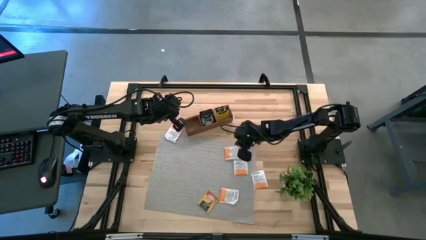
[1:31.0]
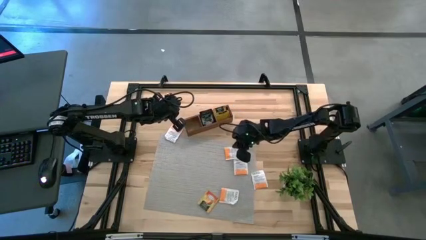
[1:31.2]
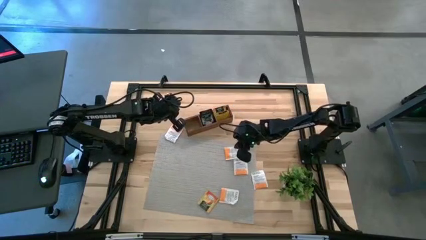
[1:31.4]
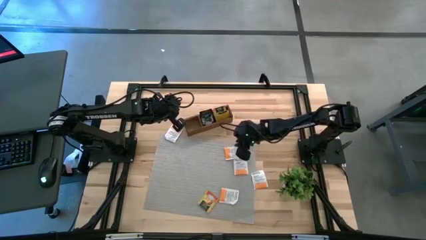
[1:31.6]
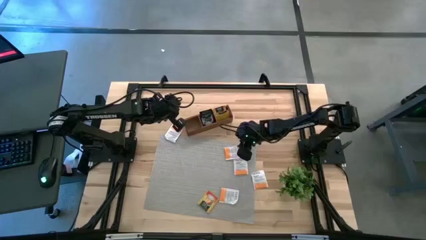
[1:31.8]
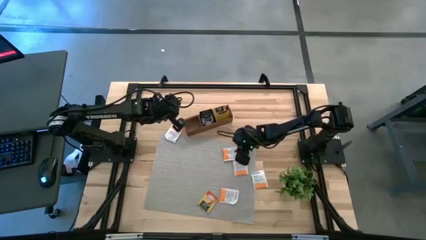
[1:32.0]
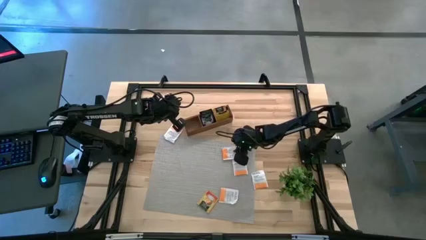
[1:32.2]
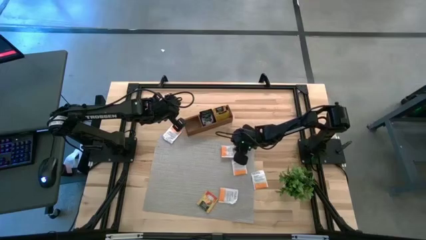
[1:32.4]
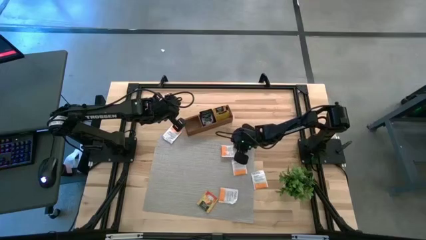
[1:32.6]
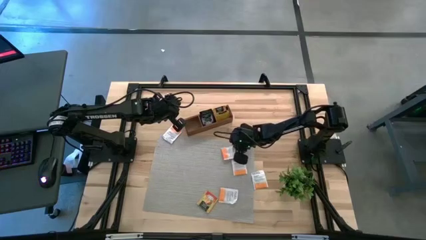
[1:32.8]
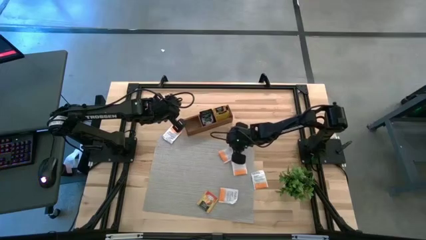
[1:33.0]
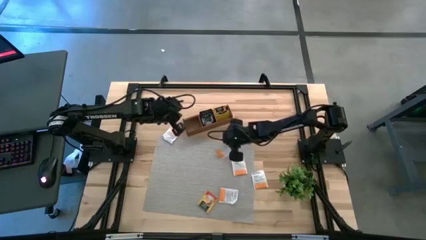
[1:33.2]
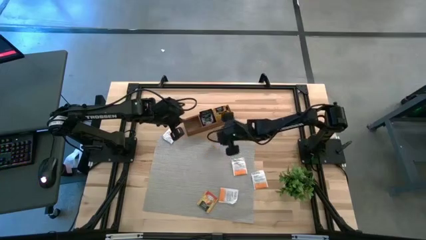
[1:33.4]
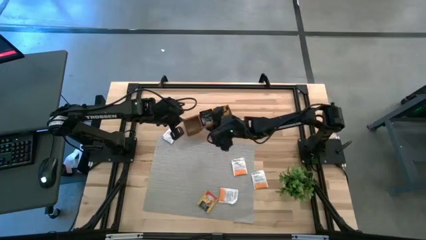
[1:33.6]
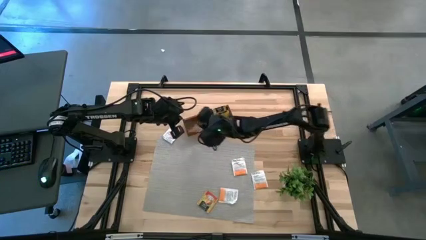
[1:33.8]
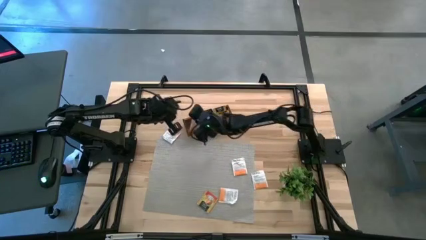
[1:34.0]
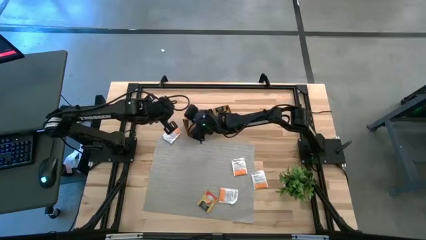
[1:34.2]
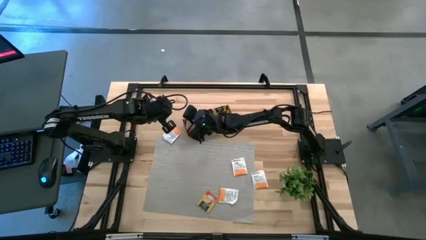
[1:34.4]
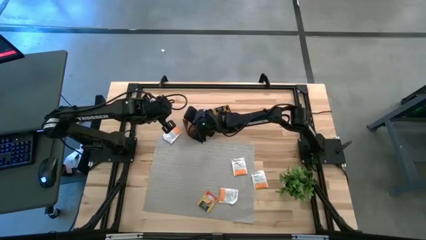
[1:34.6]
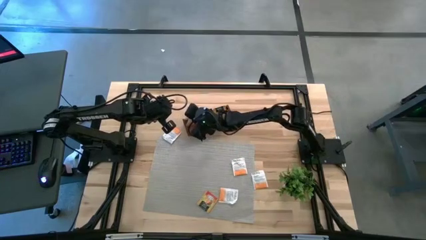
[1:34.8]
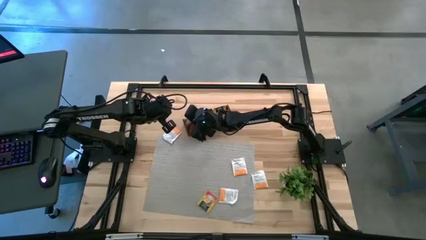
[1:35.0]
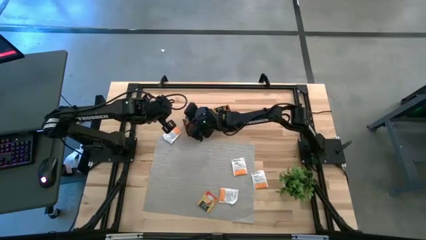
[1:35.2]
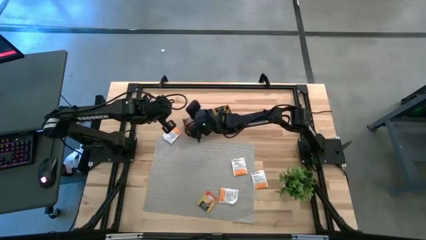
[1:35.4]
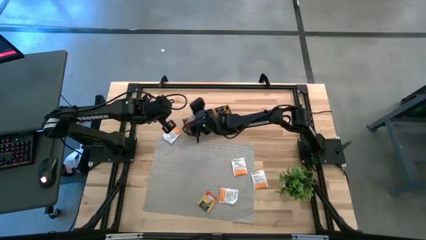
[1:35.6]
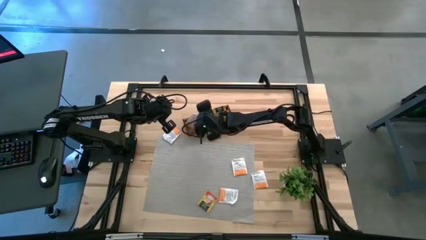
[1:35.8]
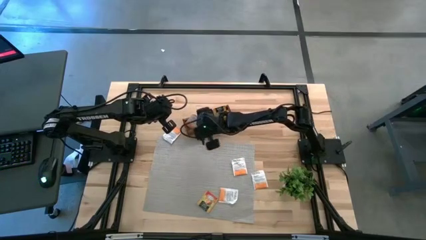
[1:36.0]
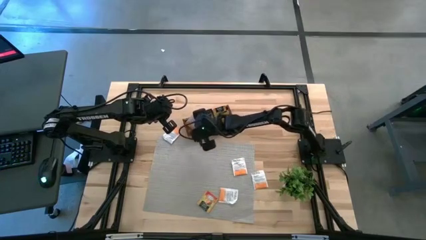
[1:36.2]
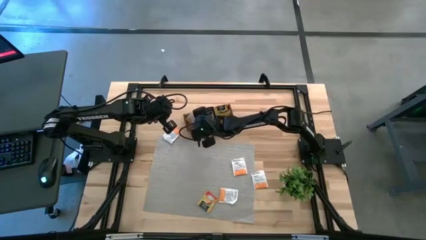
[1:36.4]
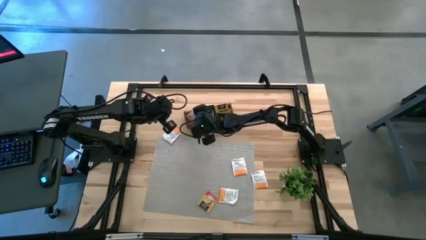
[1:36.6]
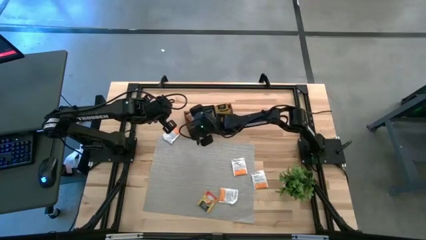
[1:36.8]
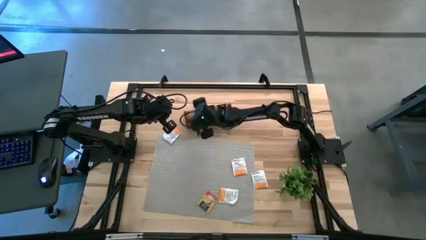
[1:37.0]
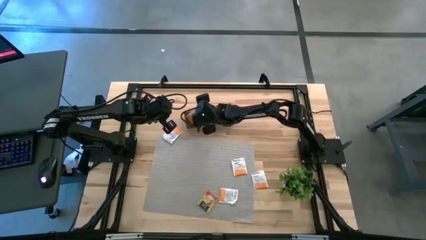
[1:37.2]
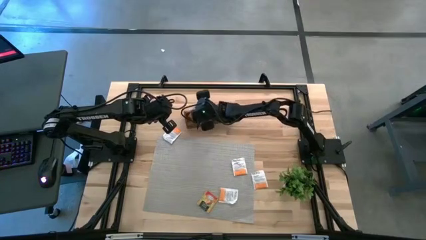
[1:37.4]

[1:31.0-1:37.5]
Task: Pick & Place Tea
Put the orange tea bag into the left section of the wooden organizer

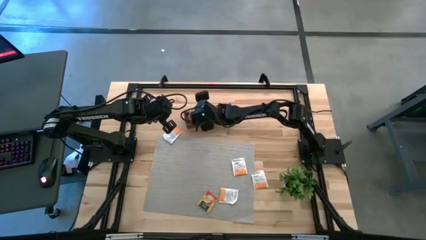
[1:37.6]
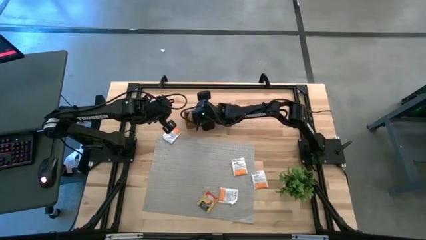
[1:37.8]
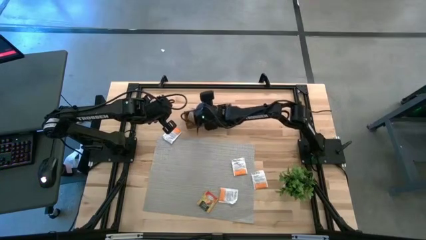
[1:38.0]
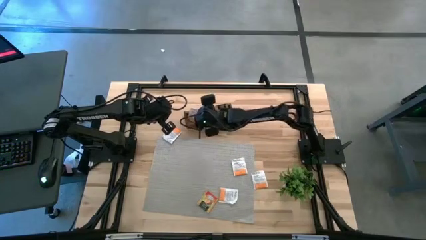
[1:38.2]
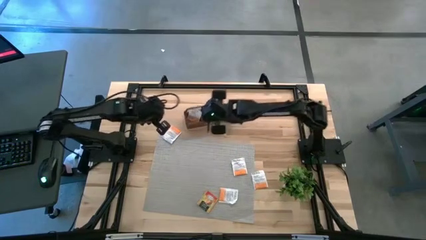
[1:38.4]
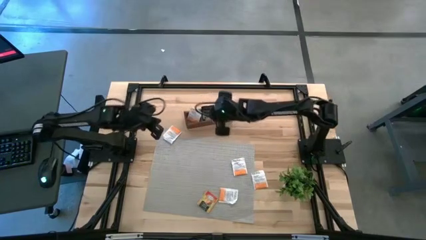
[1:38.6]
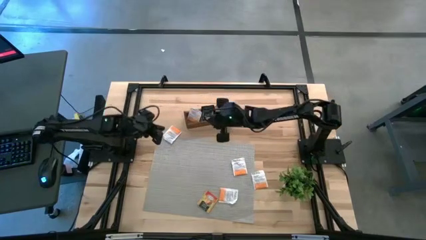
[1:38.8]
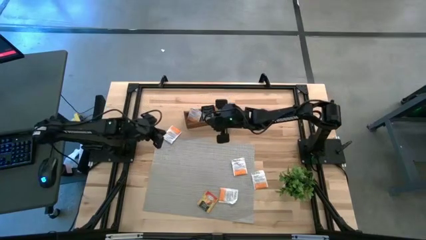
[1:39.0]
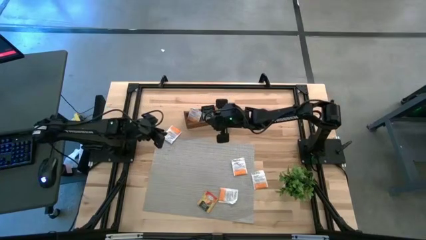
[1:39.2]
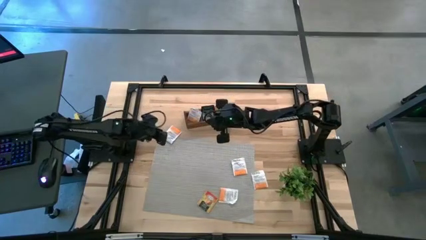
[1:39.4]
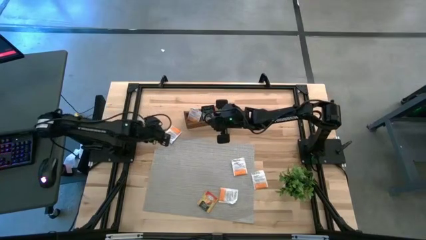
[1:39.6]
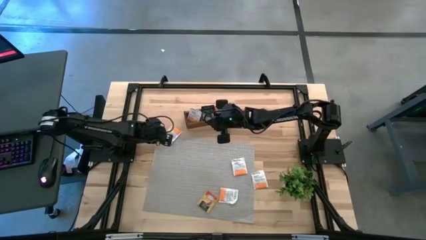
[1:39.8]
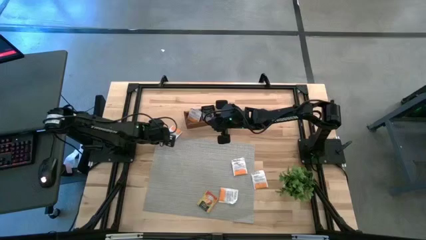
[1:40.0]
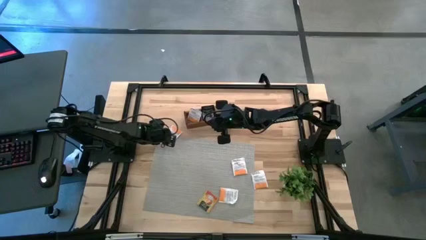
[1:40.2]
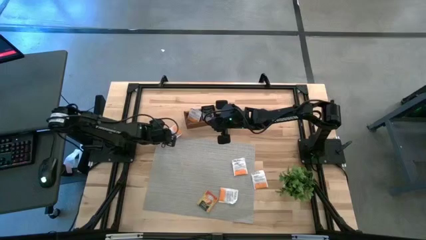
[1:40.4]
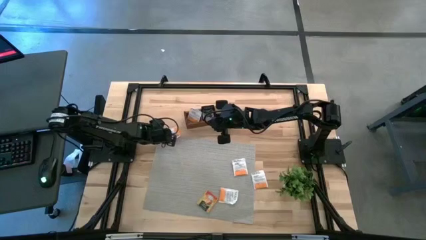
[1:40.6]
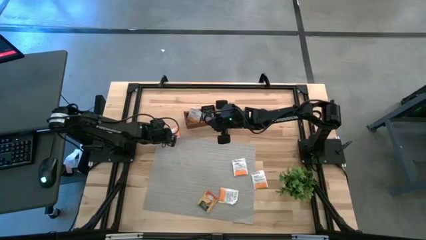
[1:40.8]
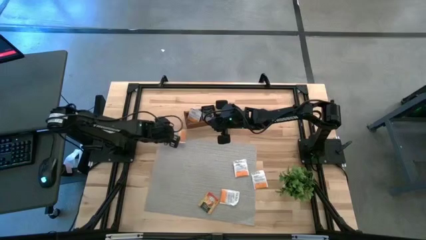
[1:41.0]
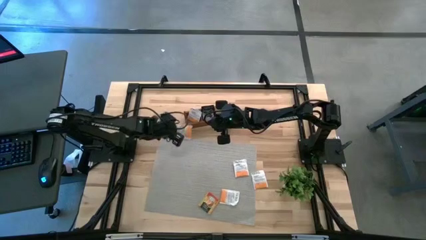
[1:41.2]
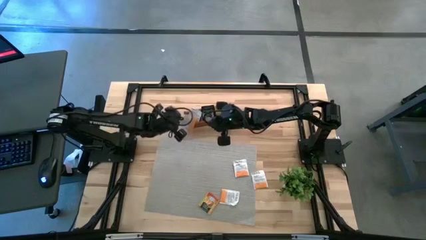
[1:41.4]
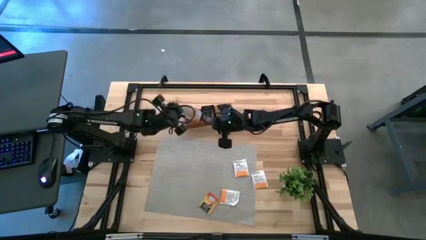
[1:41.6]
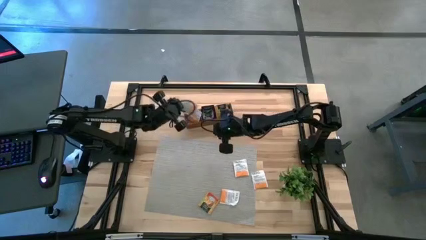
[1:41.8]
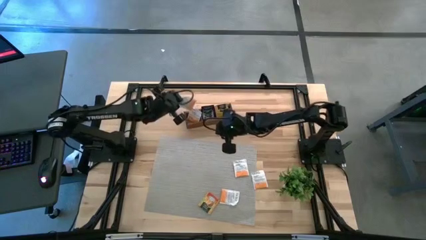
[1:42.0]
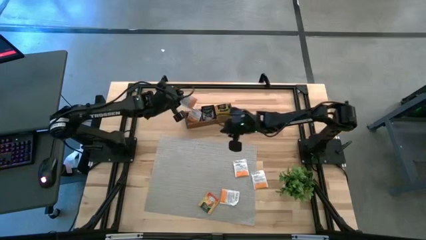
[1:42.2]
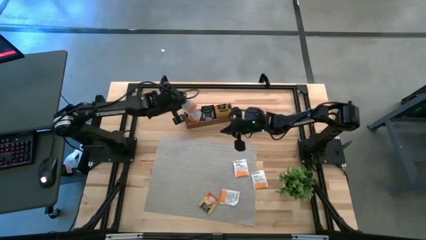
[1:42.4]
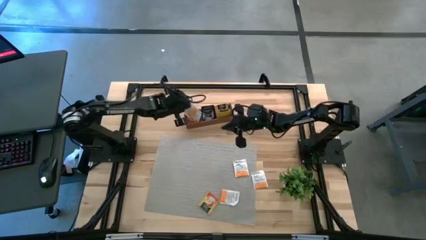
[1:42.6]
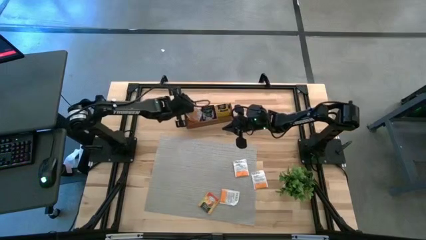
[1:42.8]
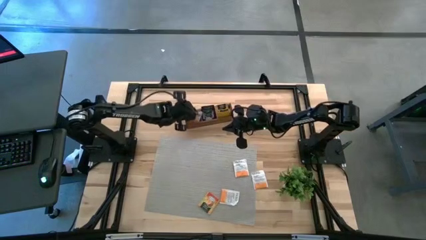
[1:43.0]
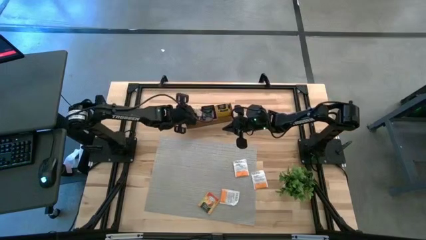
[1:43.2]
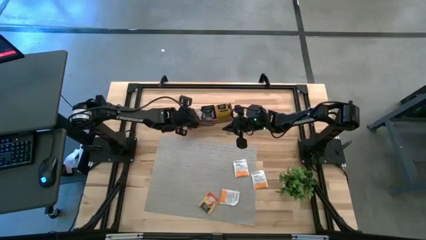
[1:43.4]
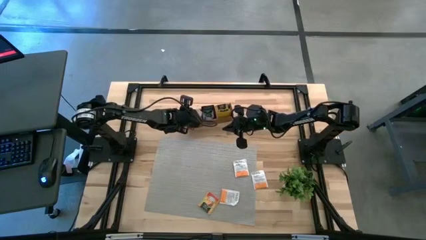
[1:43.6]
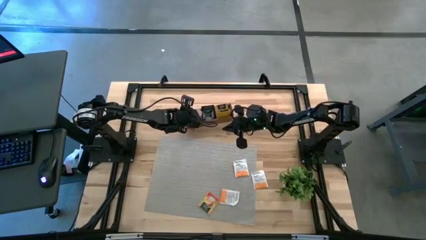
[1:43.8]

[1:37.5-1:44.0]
Put the orange tea bag into the left section of the wooden organizer

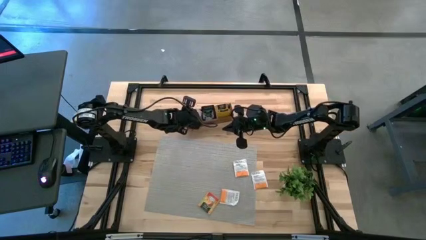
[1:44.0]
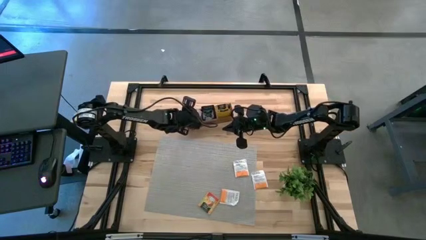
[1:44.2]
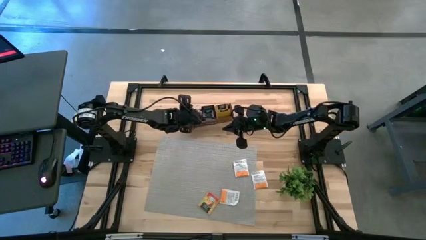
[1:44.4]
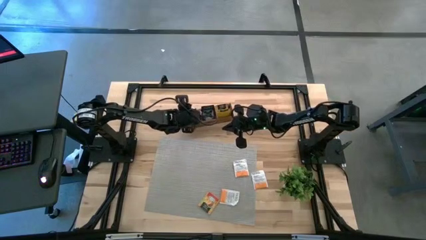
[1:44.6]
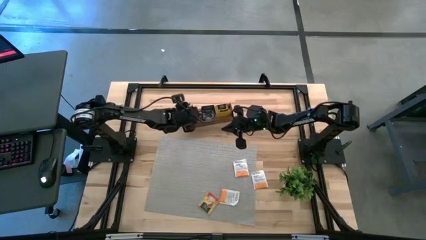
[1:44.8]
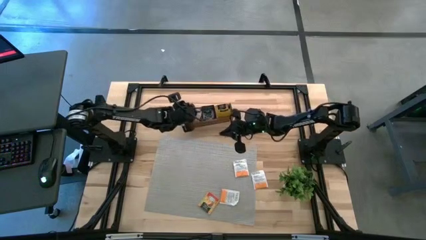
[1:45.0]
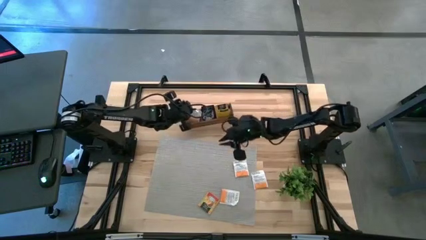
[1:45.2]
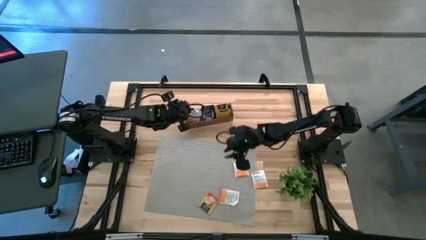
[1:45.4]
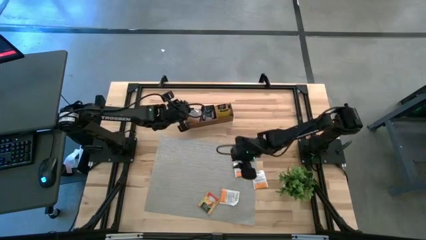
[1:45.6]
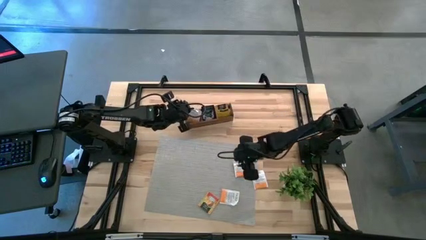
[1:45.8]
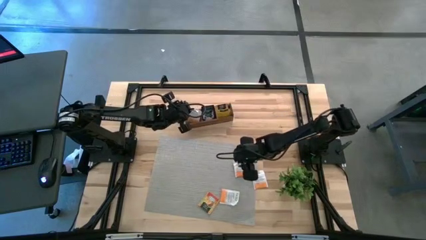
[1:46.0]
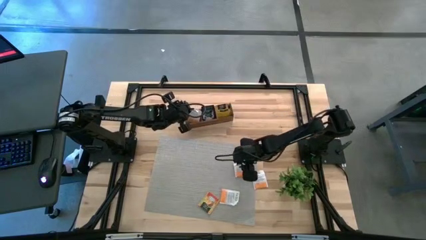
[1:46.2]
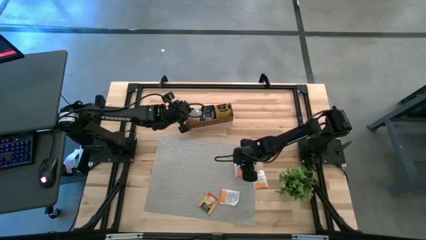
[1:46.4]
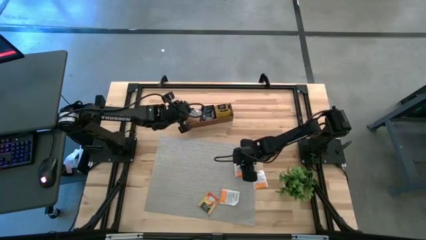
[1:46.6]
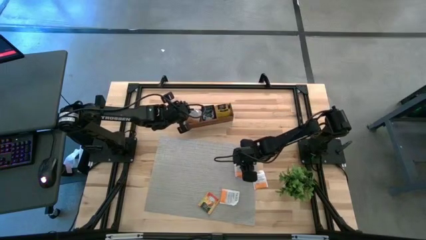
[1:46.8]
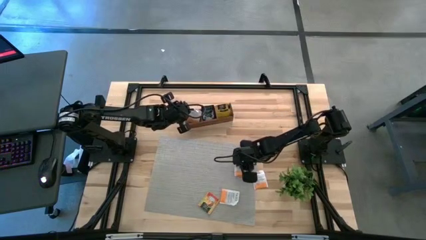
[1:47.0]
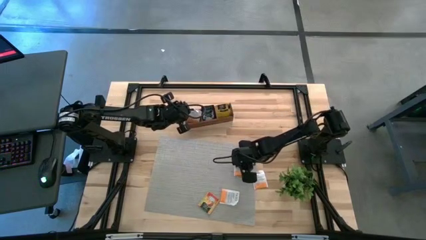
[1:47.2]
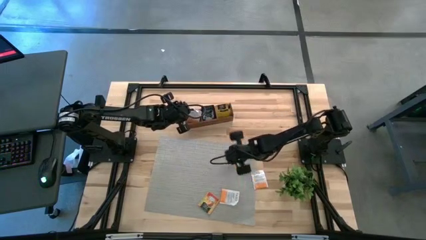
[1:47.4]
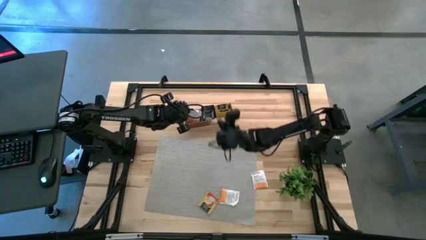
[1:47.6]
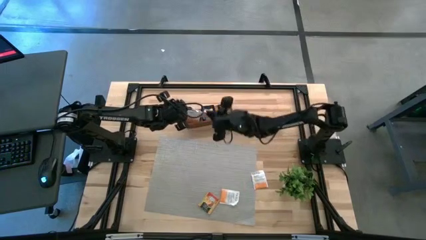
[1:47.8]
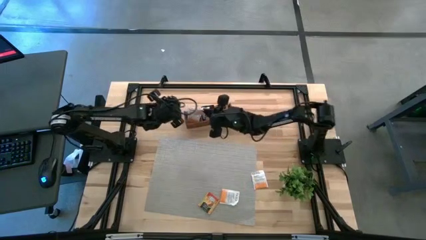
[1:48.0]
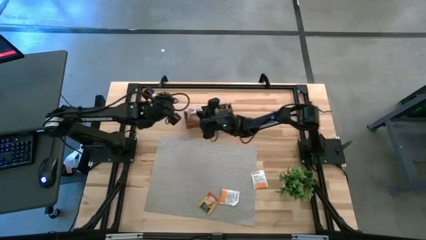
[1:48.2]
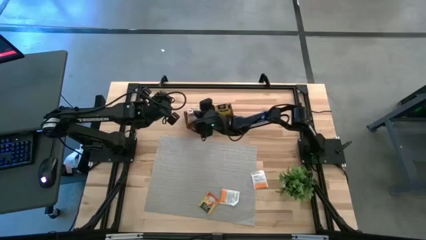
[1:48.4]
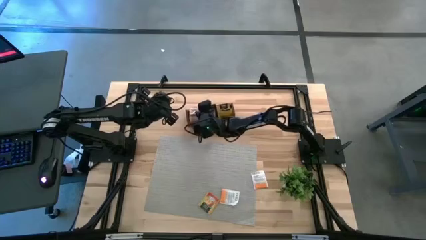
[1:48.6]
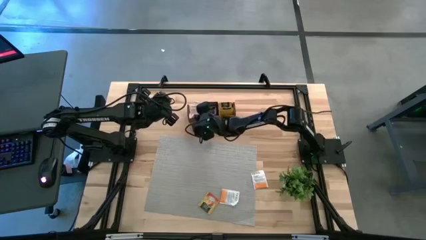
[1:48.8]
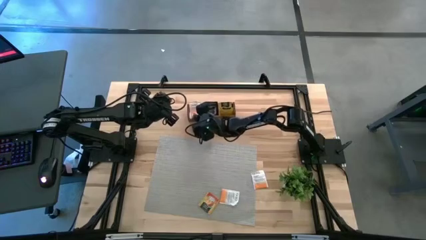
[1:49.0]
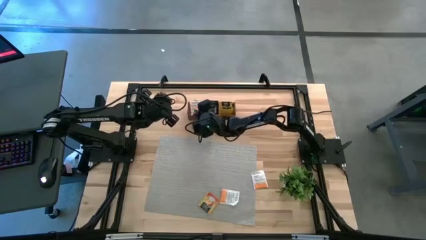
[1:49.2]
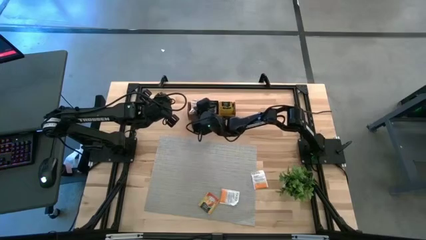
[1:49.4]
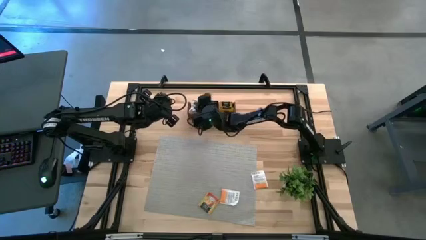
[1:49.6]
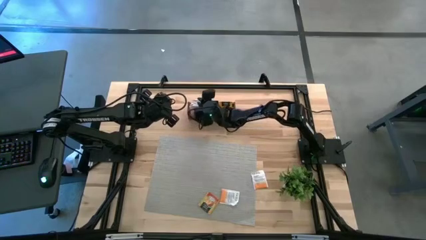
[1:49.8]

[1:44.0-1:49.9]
Put the orange tea bag into the left section of the wooden organizer
